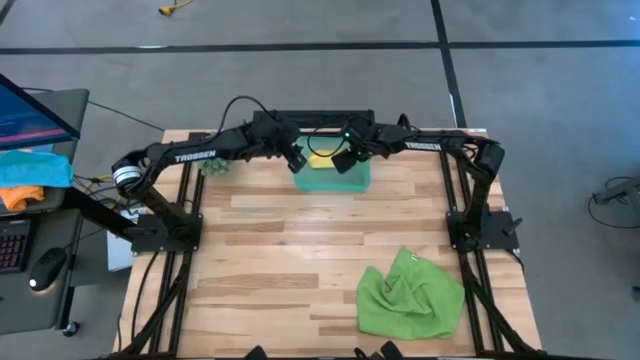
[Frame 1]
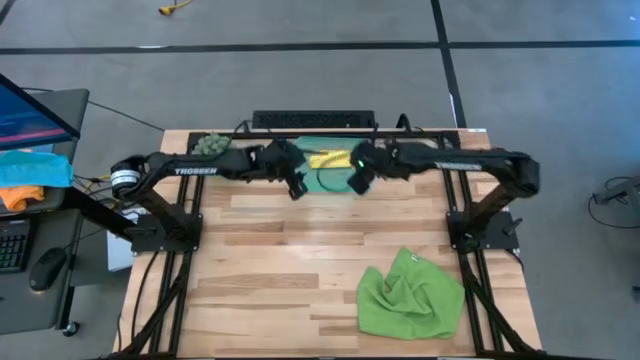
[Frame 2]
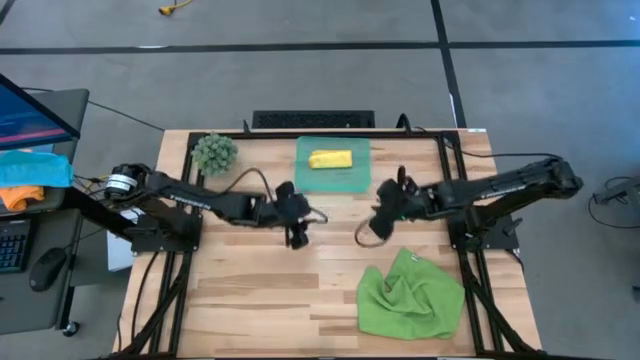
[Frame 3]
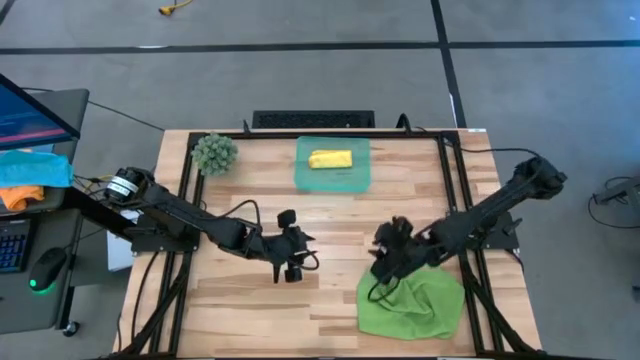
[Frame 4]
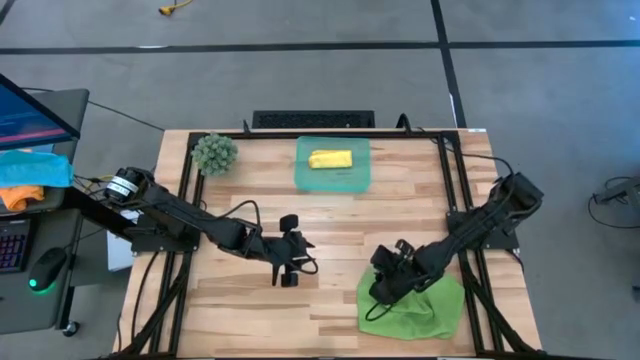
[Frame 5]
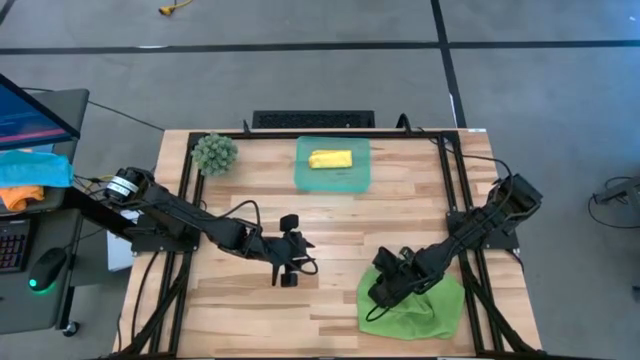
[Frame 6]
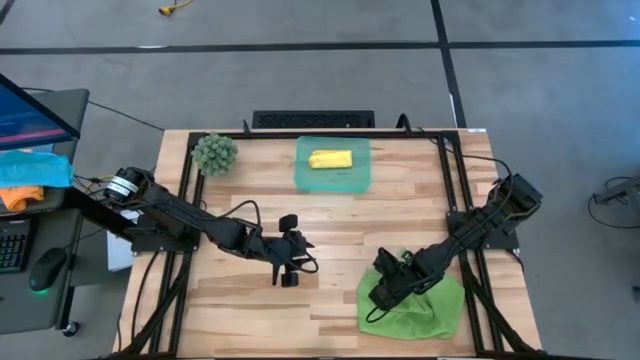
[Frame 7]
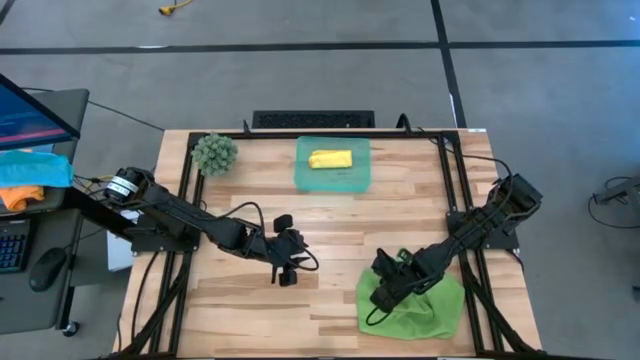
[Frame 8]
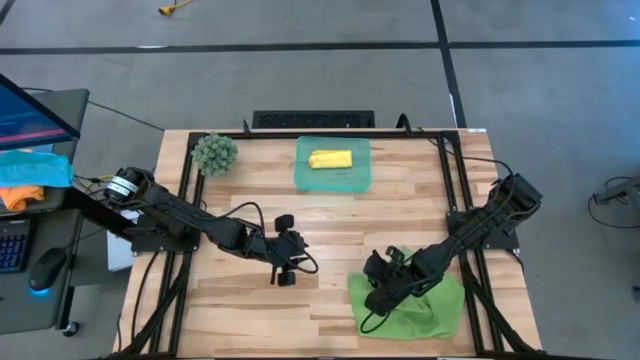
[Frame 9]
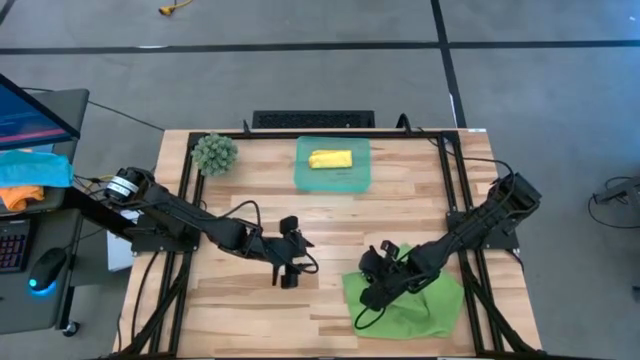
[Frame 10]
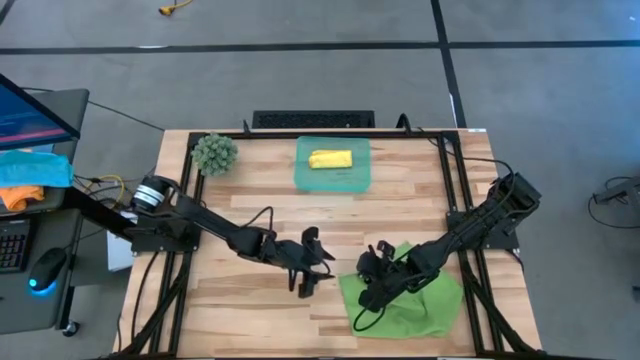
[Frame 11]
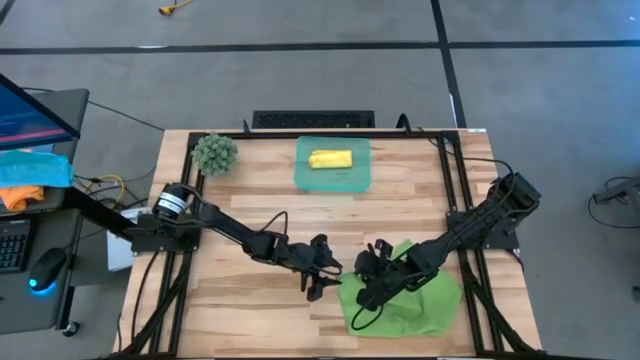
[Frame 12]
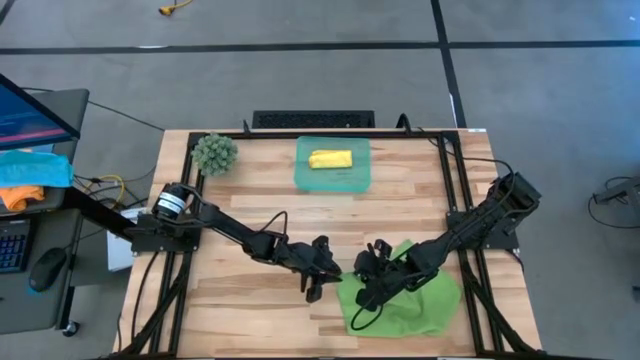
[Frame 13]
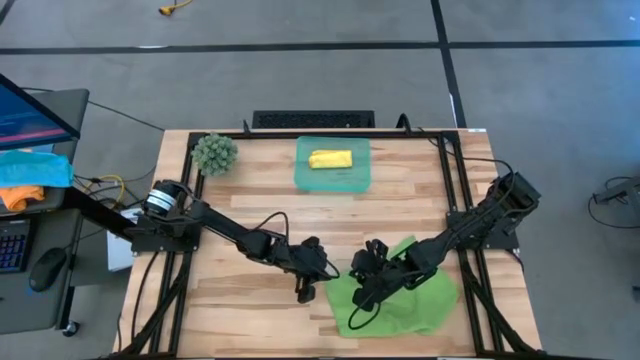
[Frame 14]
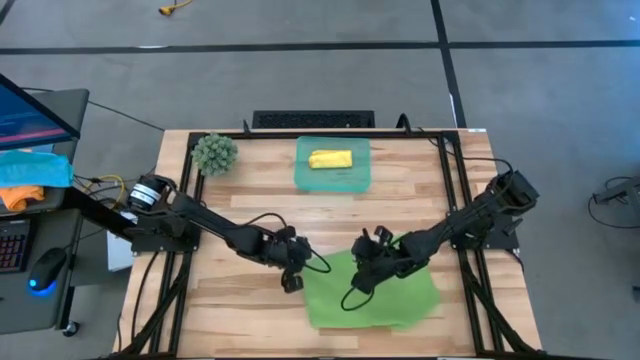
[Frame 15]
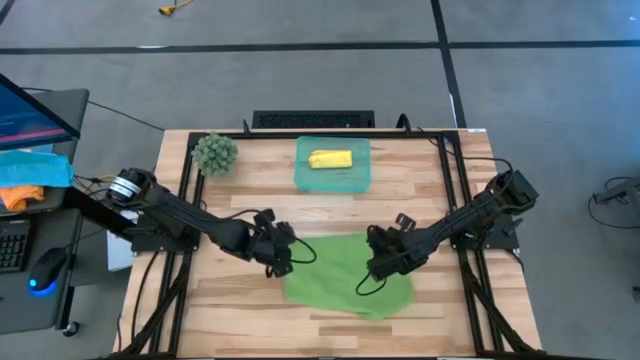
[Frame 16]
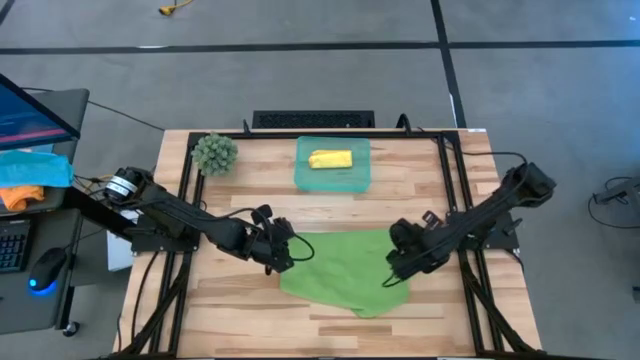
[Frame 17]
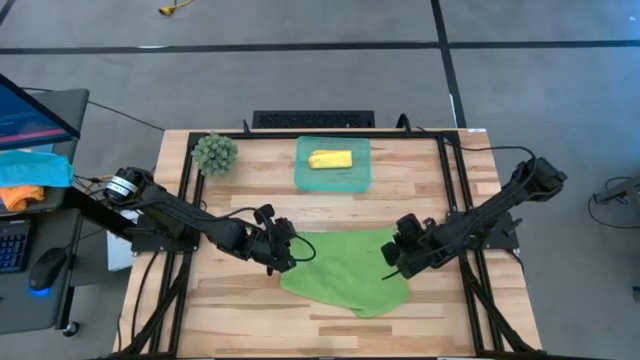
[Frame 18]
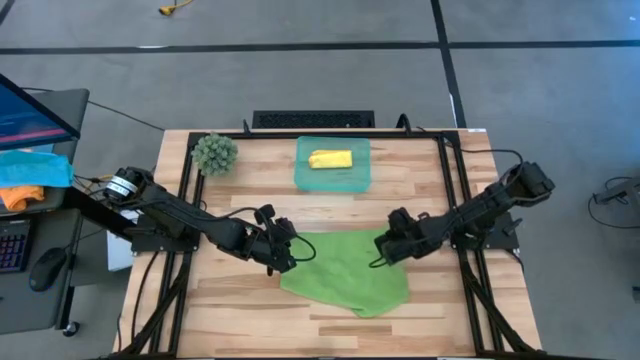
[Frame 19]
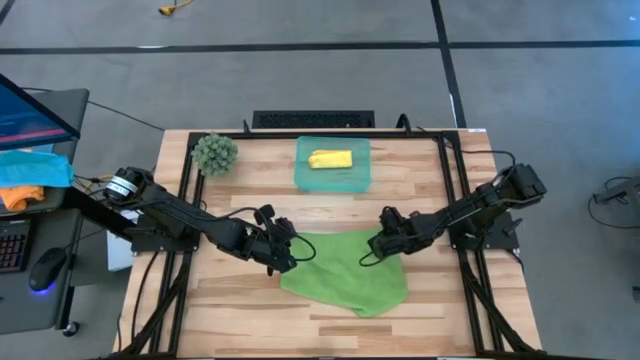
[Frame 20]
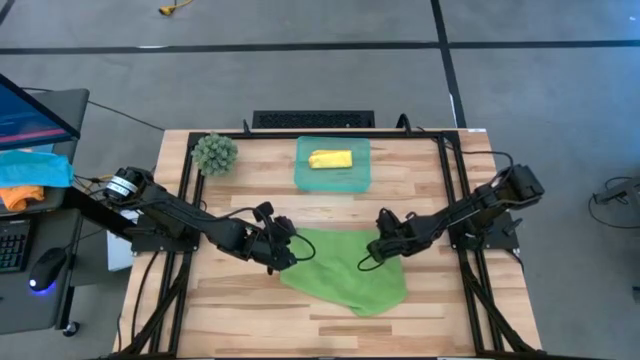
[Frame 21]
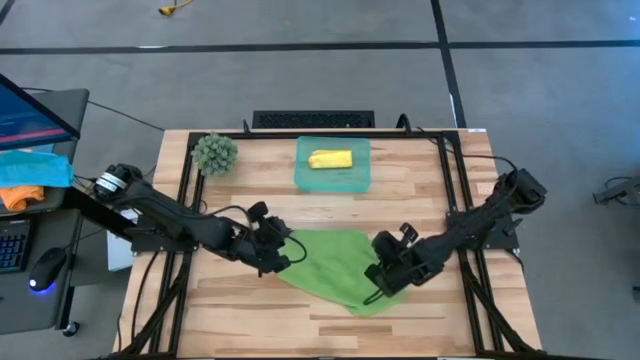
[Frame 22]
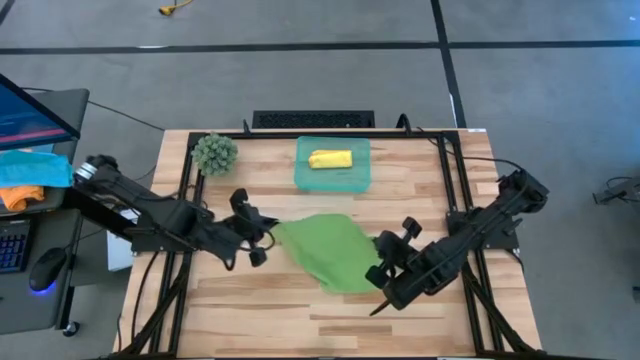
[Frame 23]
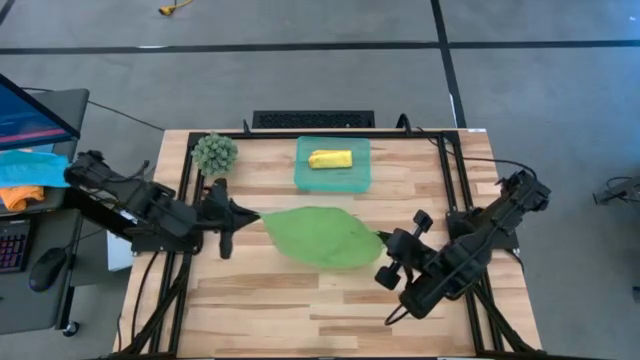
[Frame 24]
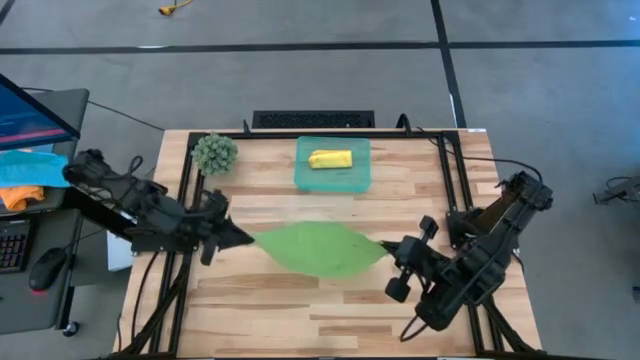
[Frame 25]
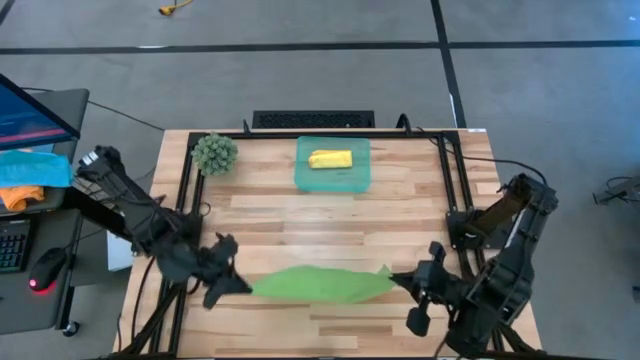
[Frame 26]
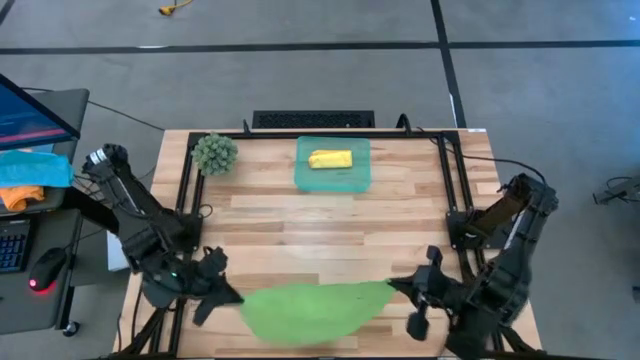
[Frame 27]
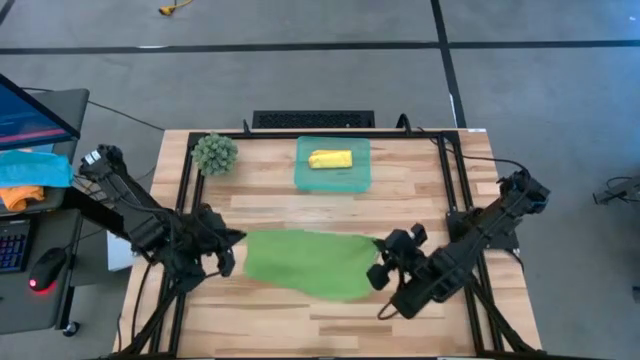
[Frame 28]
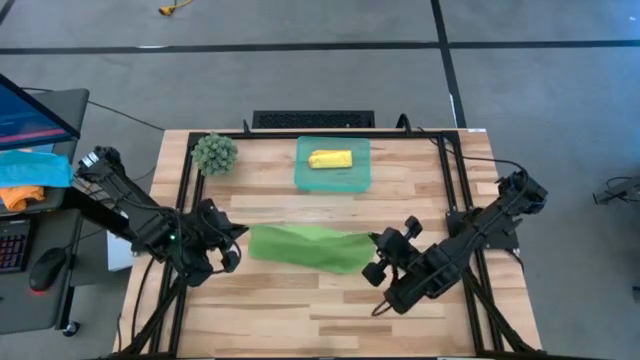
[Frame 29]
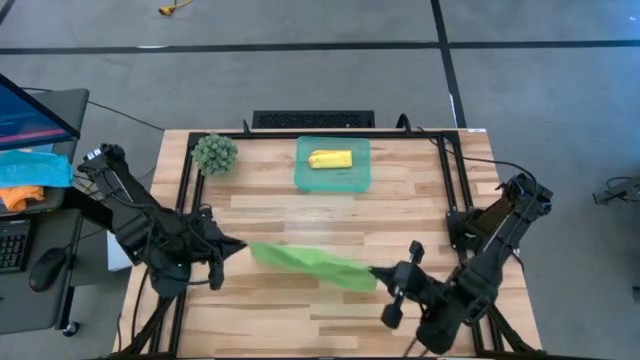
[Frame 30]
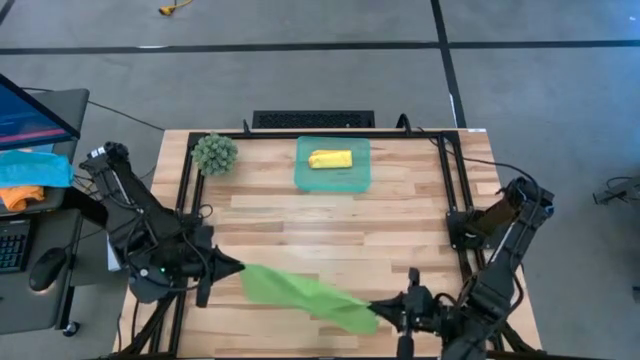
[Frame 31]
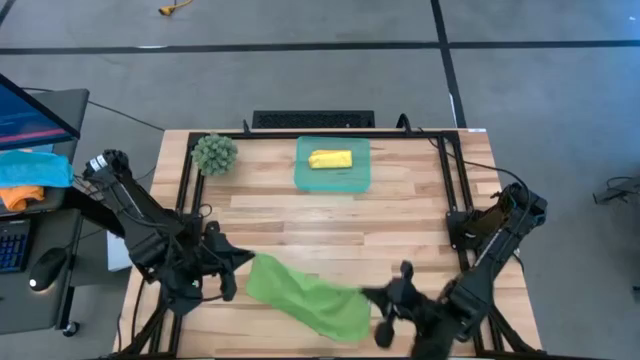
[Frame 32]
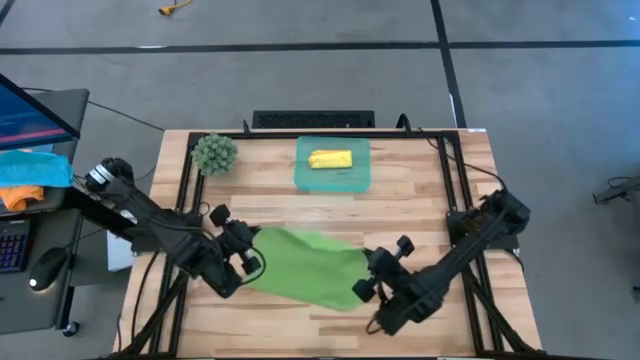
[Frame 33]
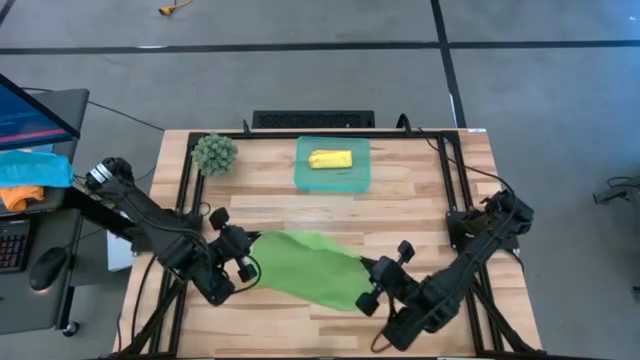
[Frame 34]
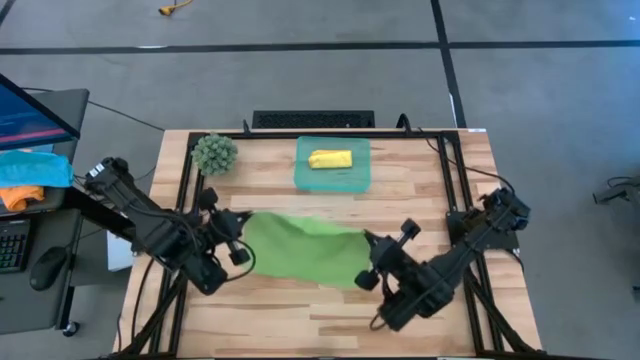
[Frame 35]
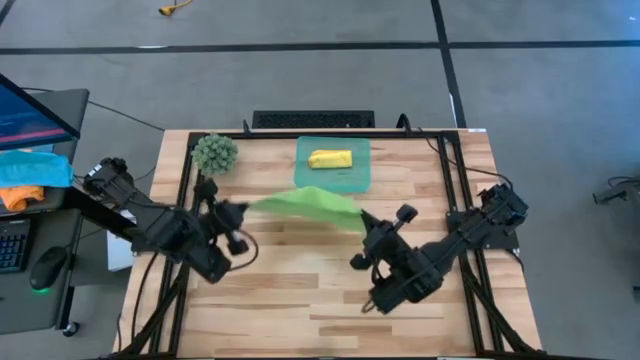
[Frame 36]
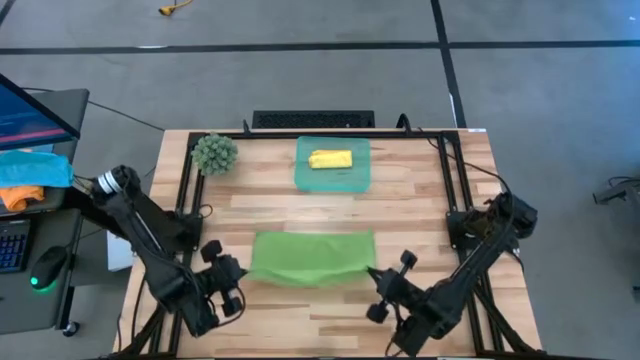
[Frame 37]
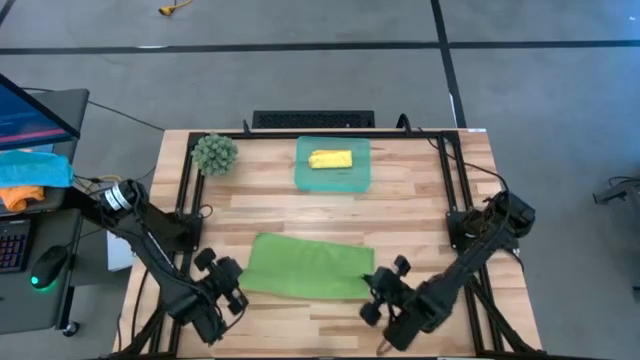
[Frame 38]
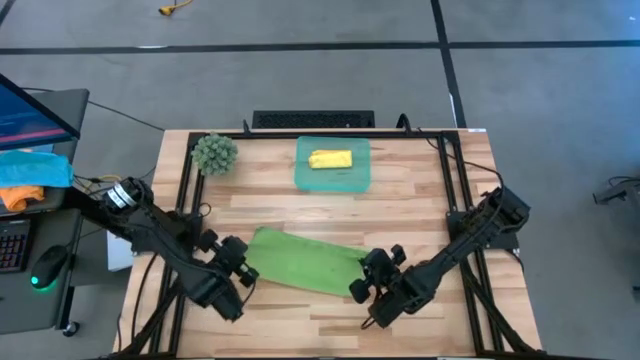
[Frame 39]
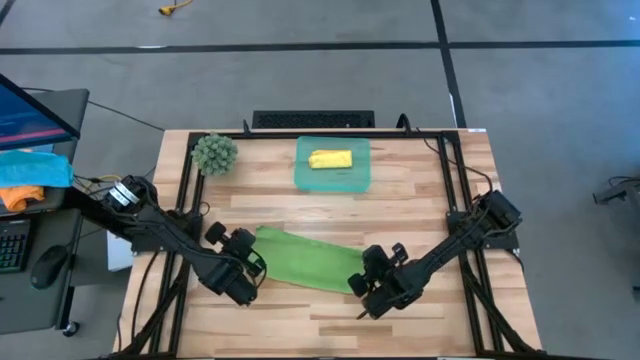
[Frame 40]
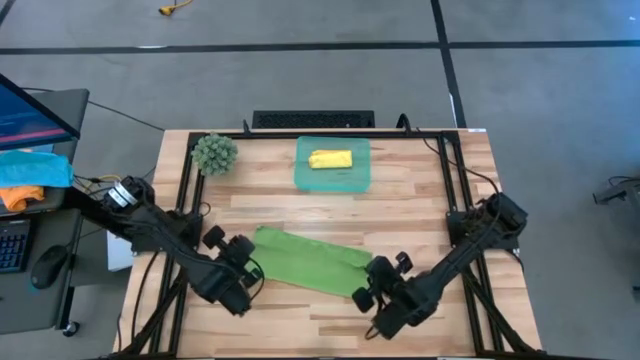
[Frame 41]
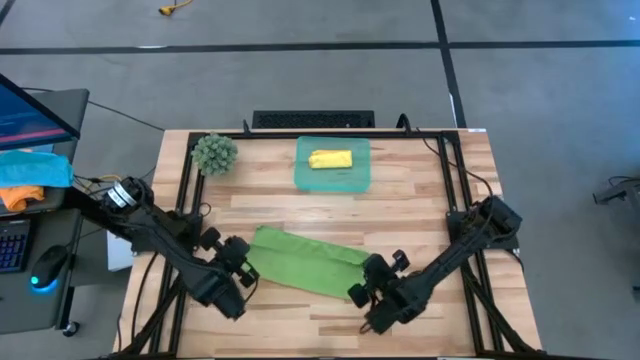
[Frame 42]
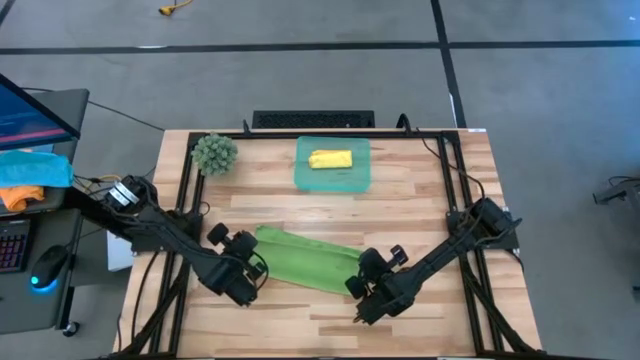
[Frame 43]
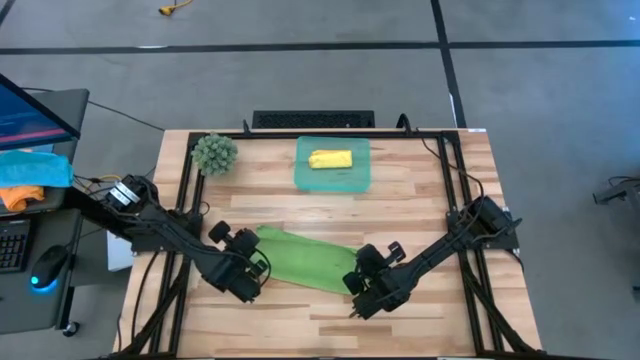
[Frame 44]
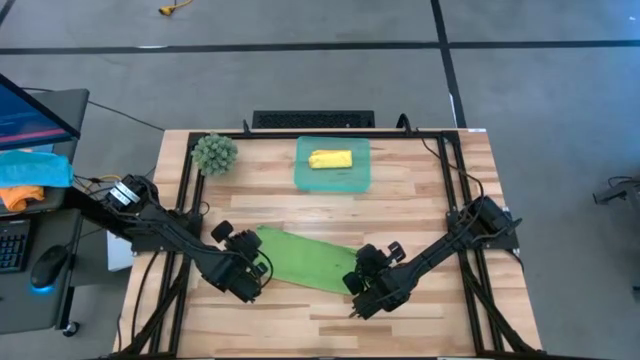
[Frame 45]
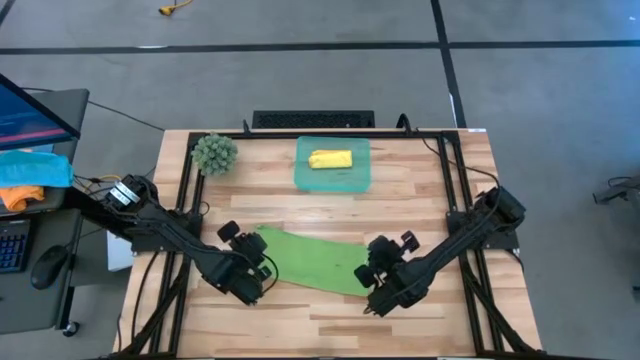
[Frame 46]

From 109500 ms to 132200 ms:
Task: Roll microfiber towels into tight, uniform cylinder then place into a basket
Fold the green microfiber cloth
